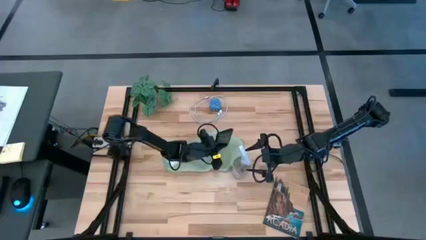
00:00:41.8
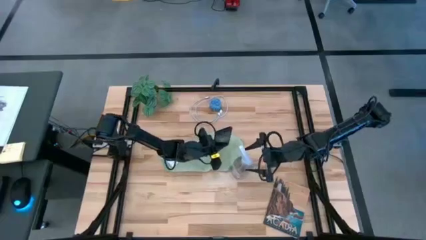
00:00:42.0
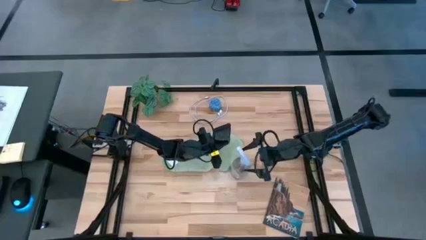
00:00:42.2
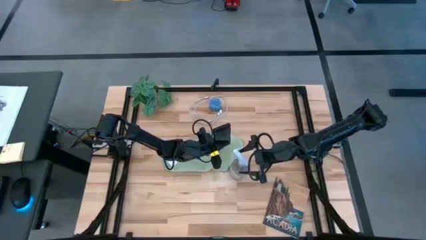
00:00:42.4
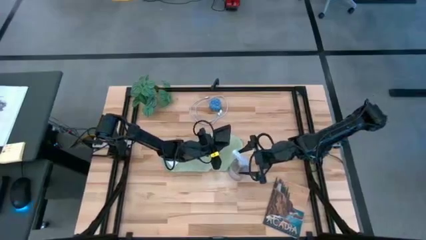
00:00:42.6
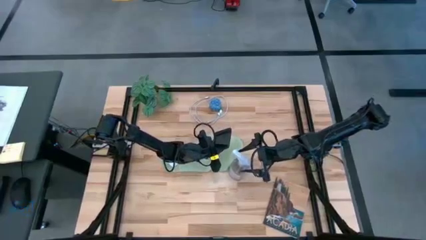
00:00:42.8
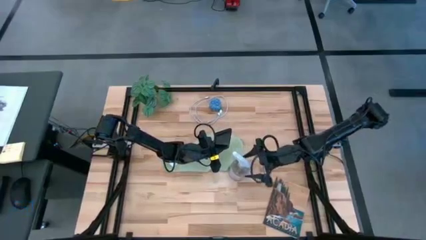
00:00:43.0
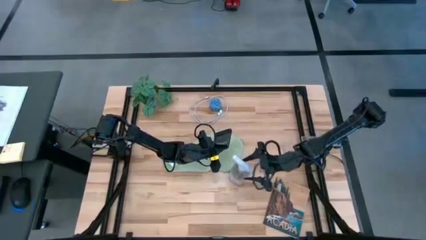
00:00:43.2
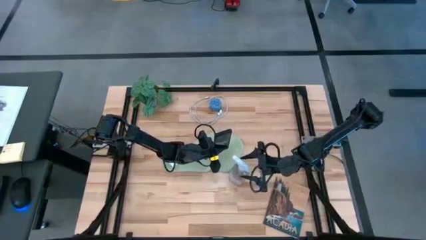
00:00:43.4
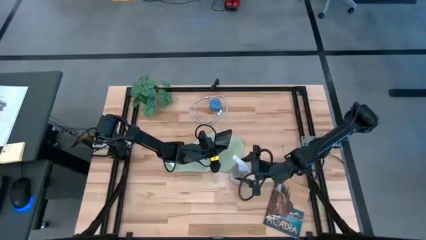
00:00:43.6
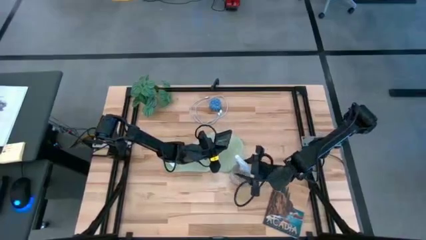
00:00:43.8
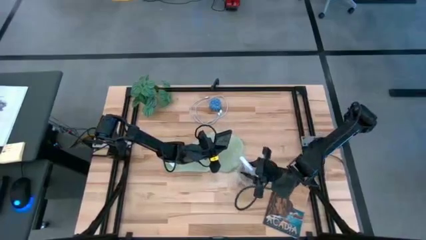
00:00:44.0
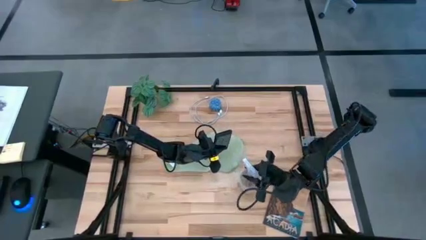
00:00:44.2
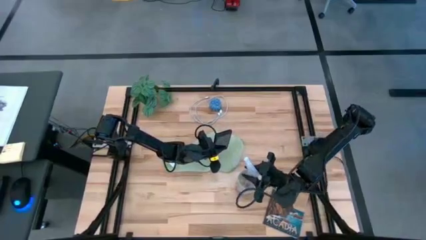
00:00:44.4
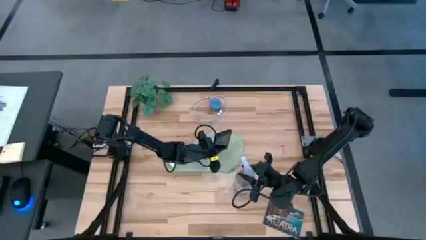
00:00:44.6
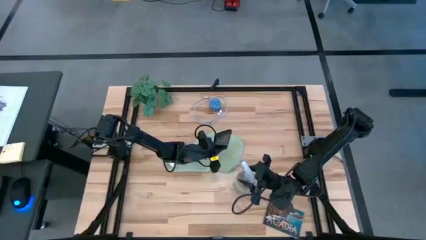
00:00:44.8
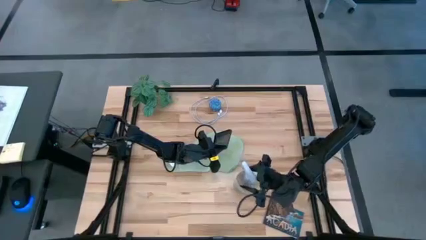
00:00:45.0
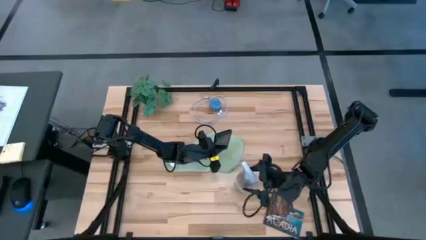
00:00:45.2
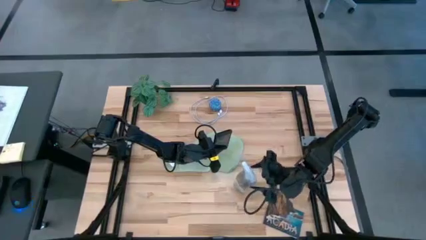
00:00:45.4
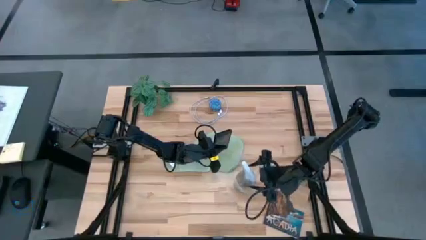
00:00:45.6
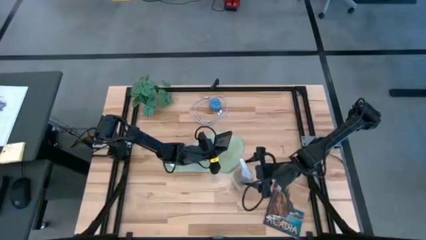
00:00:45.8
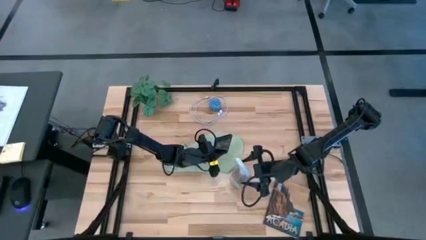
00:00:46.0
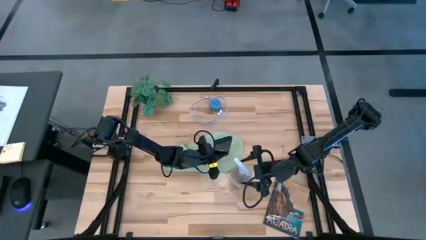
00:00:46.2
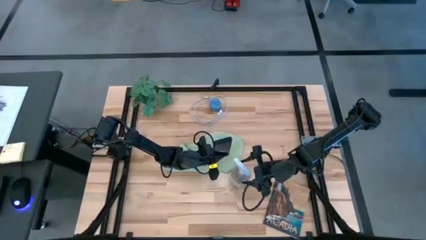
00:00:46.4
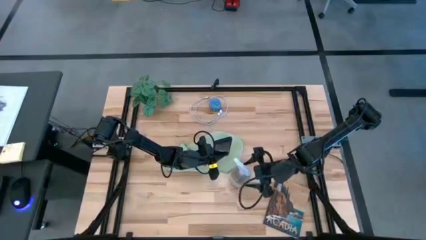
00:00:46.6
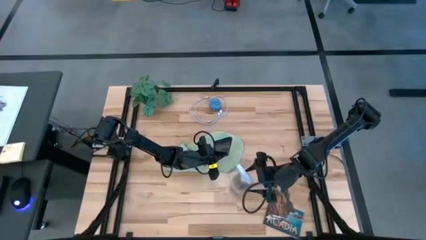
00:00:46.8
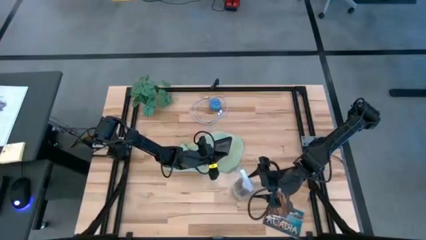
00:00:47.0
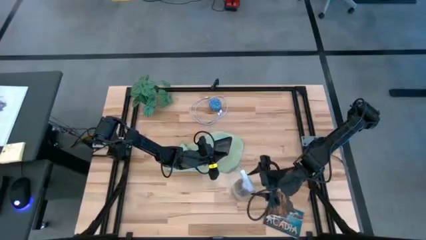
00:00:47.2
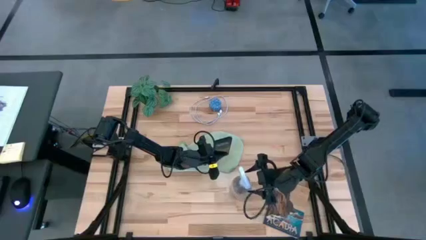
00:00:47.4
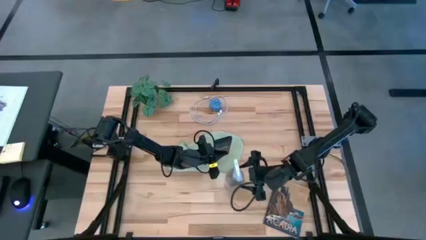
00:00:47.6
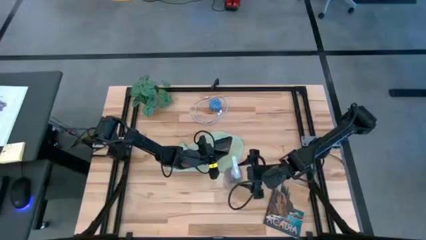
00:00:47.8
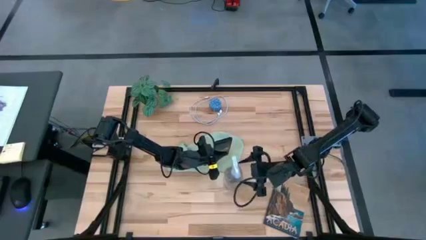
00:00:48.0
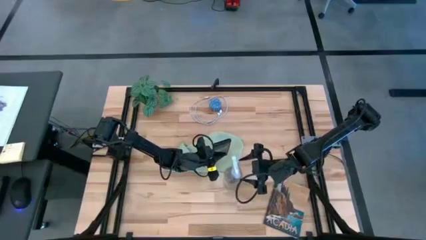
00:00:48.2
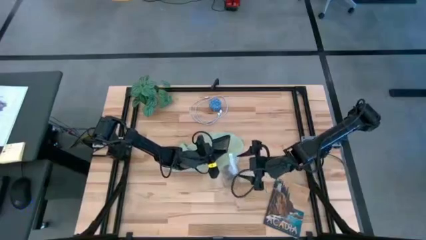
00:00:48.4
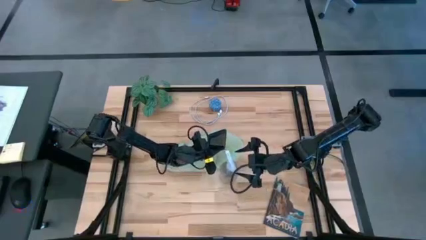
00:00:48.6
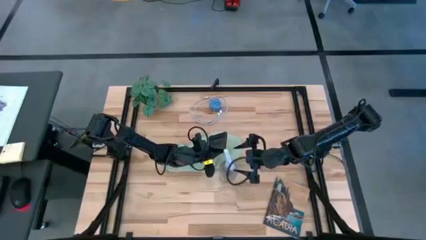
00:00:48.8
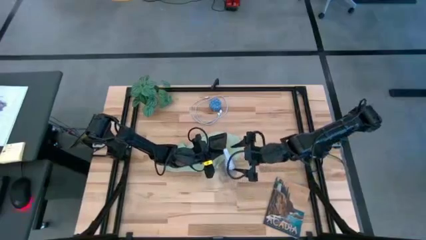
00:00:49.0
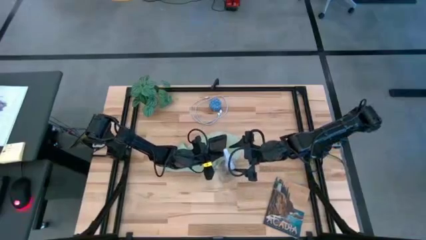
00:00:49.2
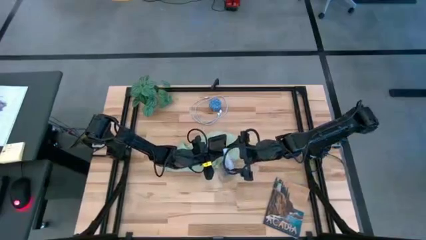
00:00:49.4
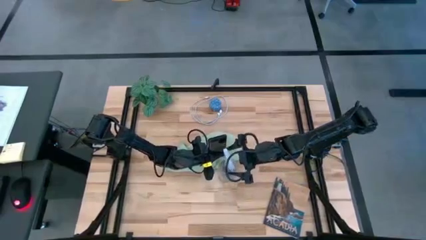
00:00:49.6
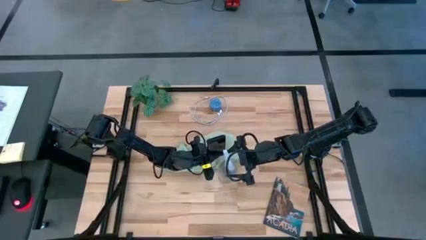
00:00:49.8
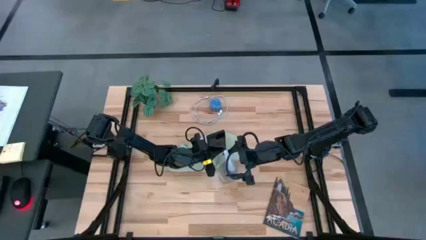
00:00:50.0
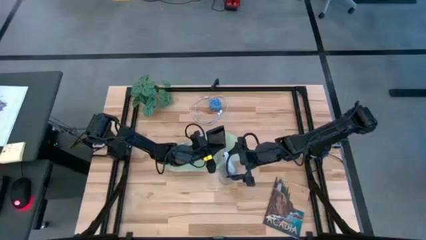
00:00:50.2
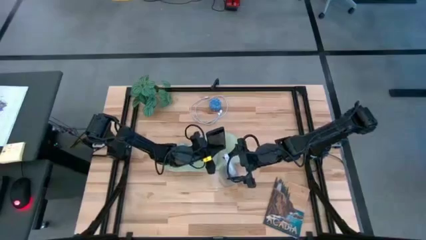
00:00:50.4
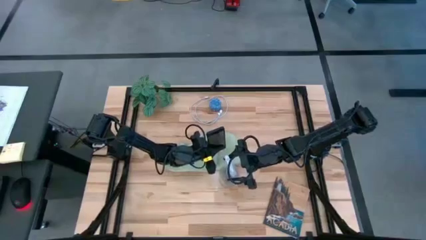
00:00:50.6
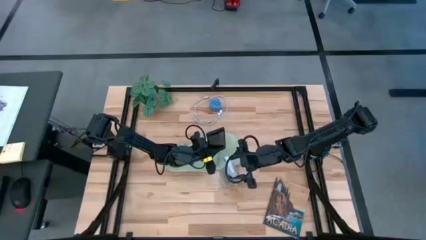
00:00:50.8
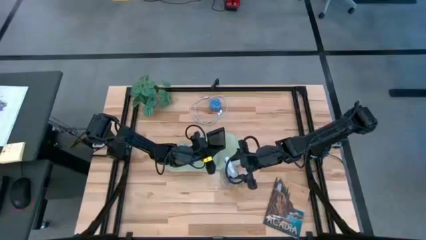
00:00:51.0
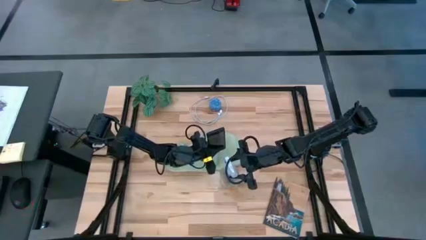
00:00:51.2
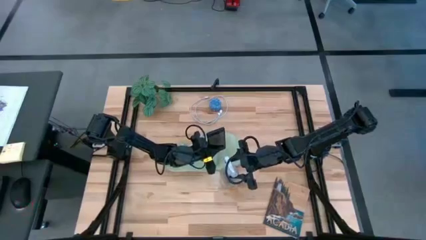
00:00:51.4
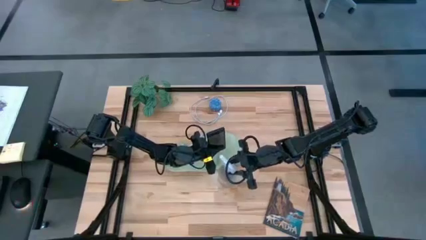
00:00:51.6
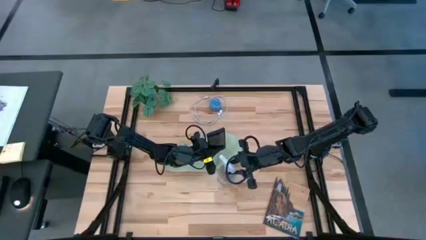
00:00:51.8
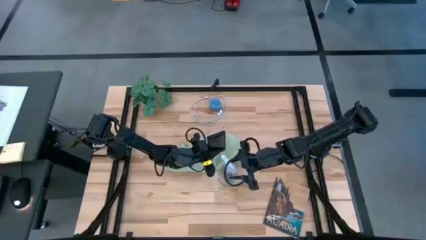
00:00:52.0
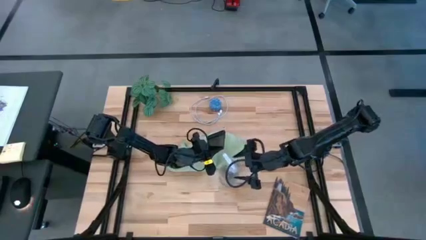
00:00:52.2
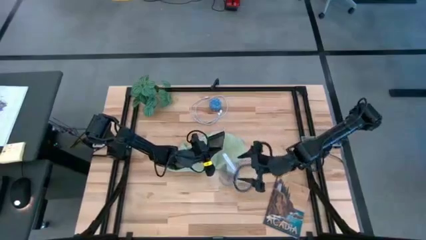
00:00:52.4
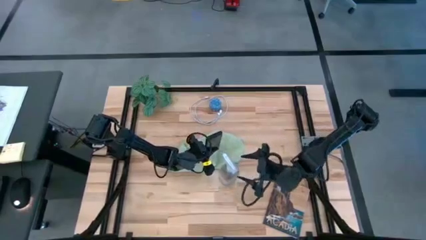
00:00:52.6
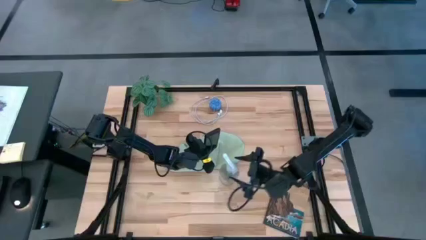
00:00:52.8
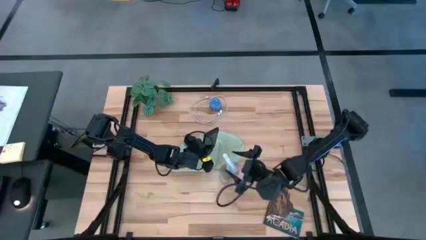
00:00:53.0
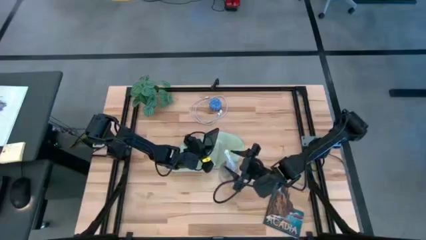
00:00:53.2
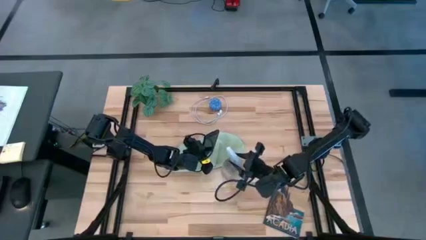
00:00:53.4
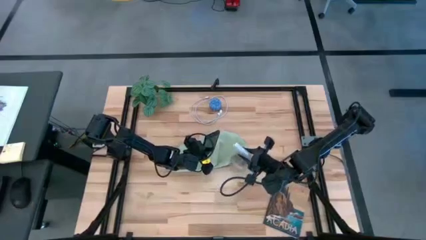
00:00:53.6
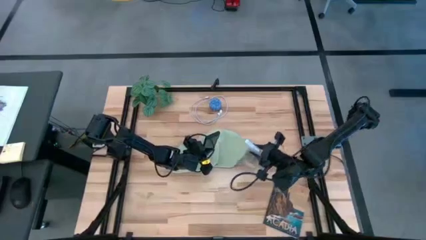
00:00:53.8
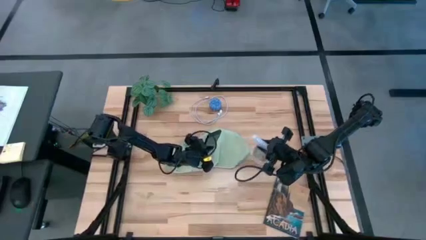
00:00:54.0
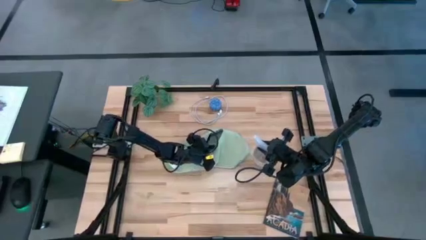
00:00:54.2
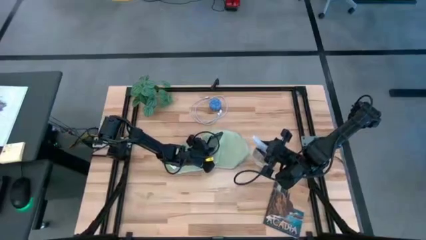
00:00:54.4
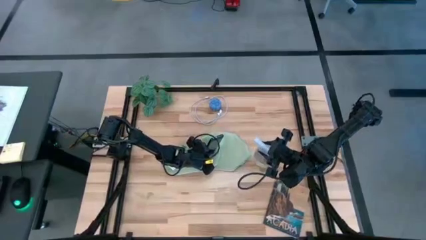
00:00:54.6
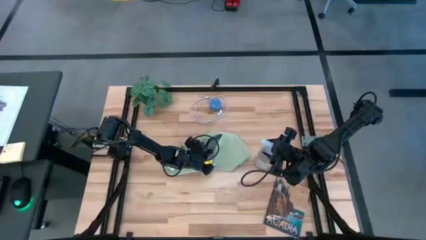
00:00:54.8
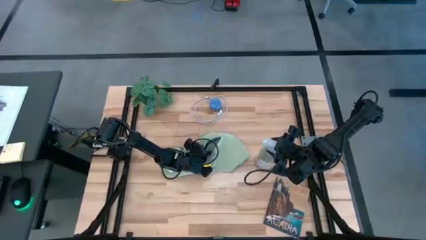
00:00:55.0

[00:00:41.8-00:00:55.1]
Task: Apply microfiber cloth
Spray the phone using the spray bottle
